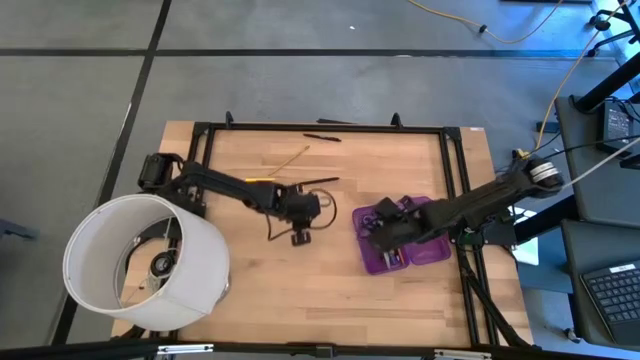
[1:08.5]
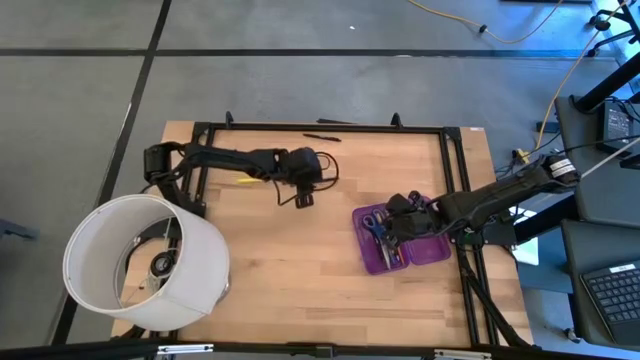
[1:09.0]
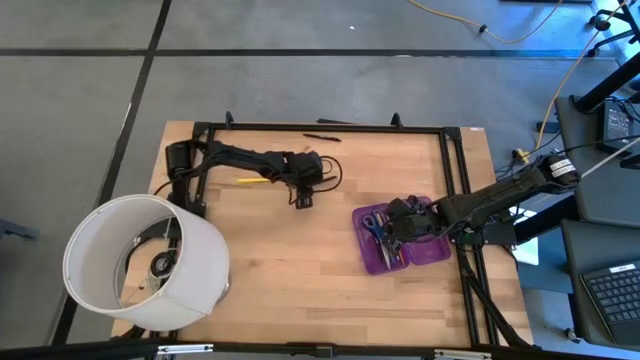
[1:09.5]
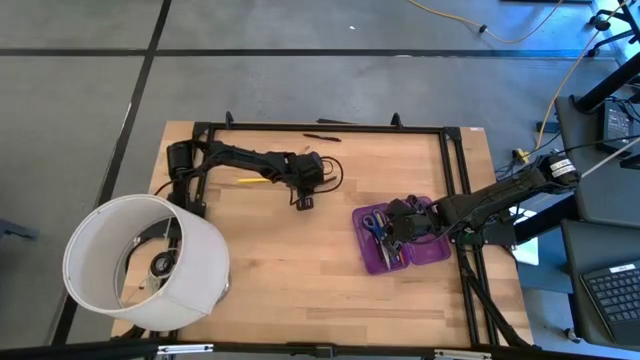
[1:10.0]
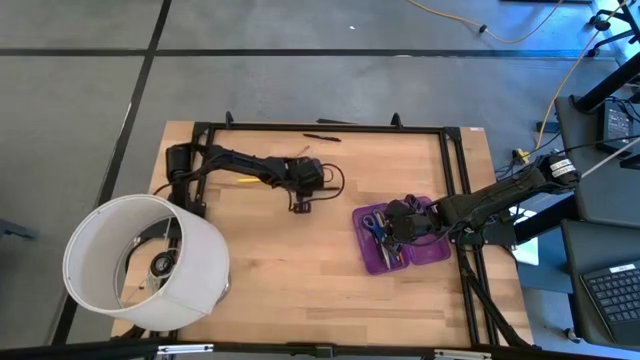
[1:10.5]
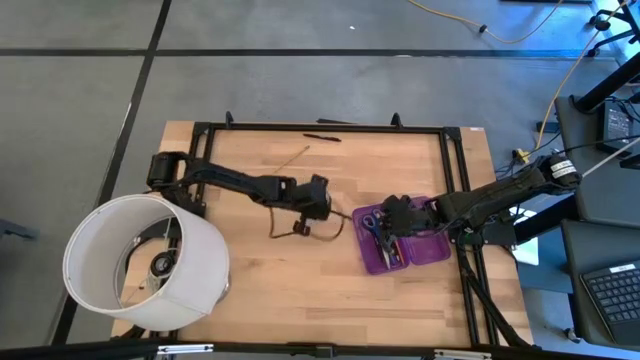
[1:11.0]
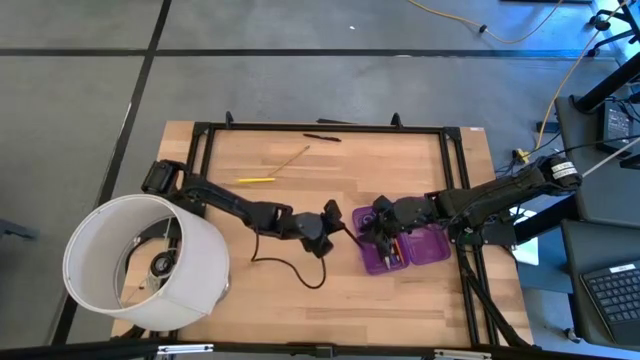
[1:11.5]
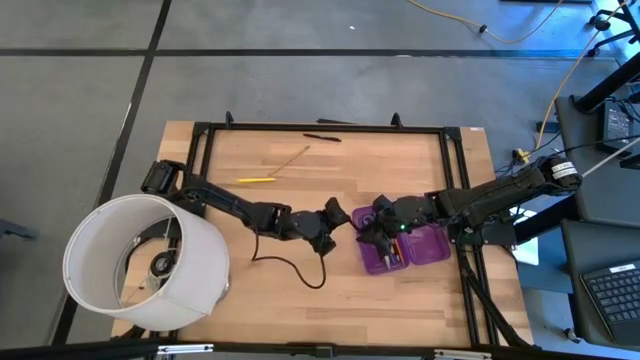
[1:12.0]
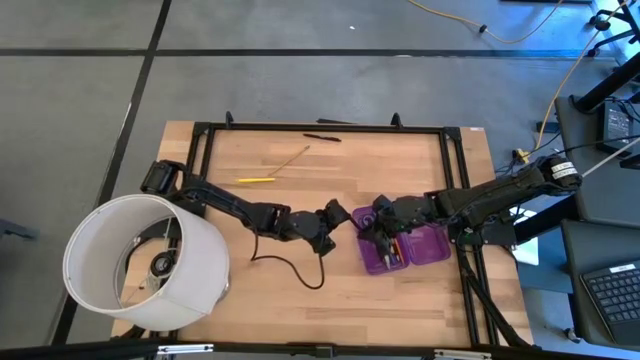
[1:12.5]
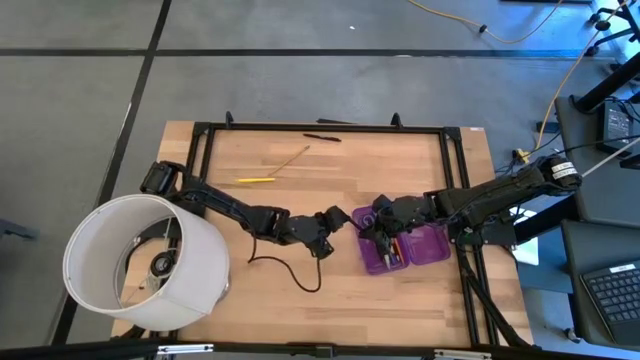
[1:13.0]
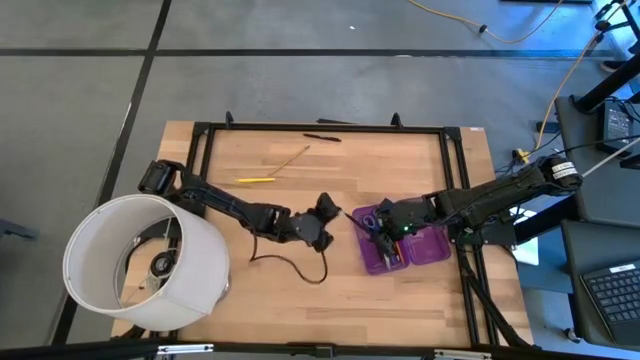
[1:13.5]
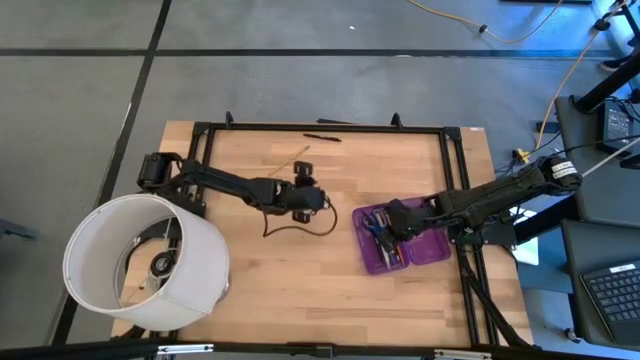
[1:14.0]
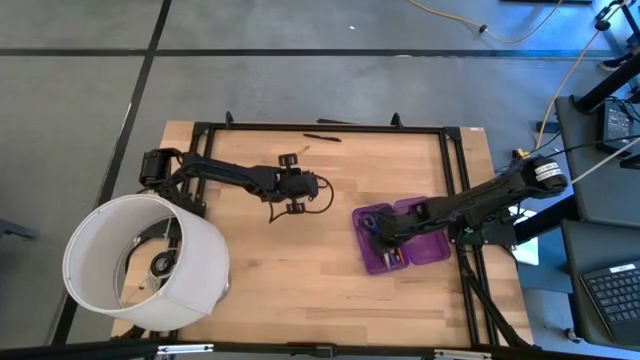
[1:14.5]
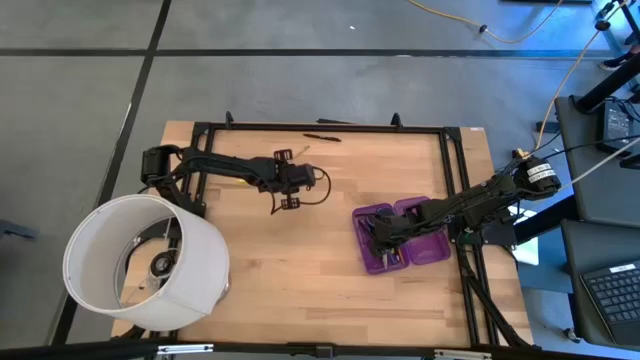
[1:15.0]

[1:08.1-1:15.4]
Task: Pick & place school supplies into a supply box
Put the bottom black pen into the supply box

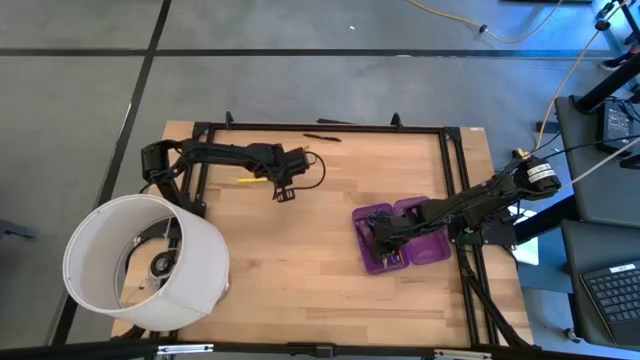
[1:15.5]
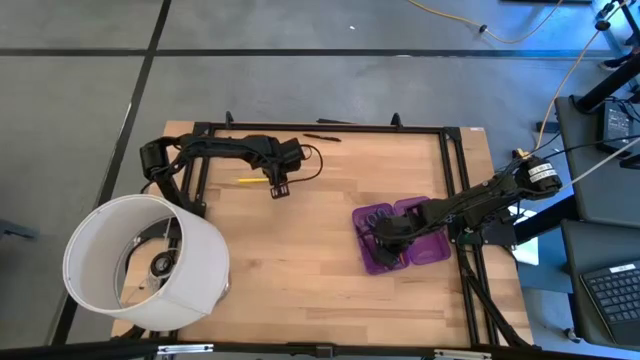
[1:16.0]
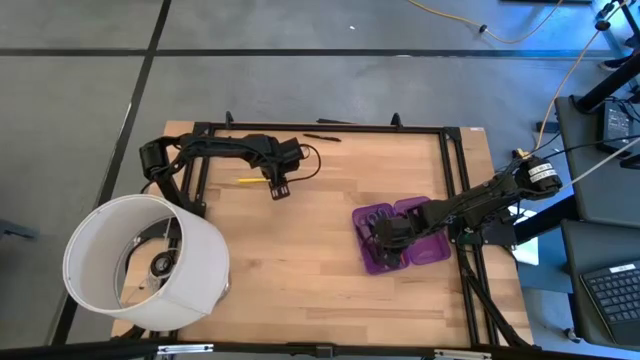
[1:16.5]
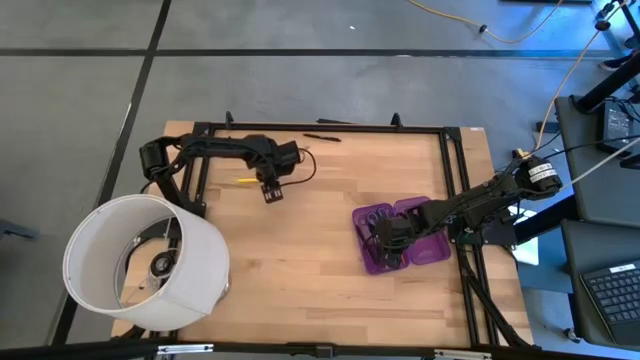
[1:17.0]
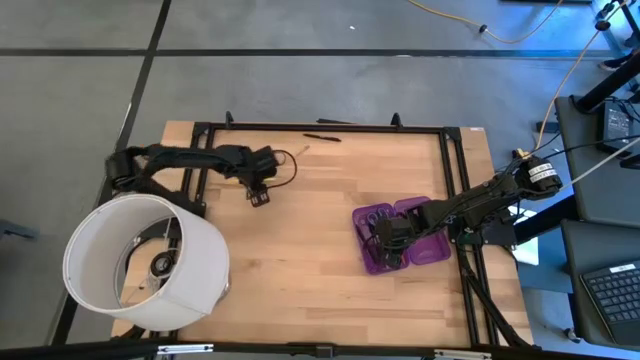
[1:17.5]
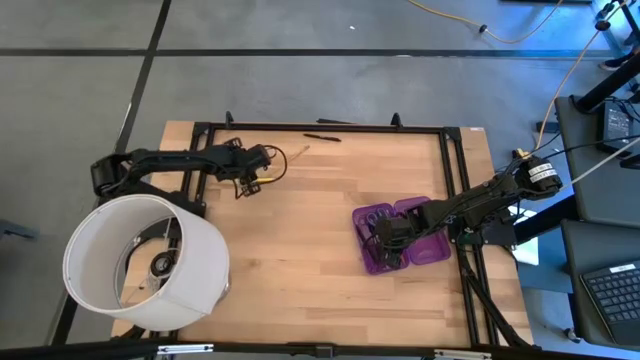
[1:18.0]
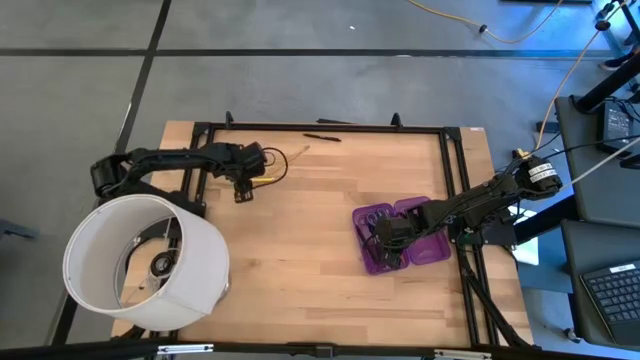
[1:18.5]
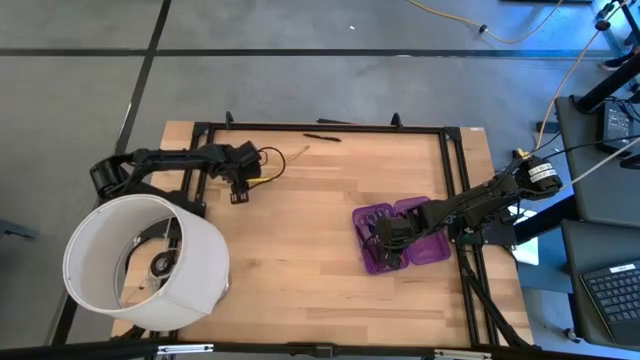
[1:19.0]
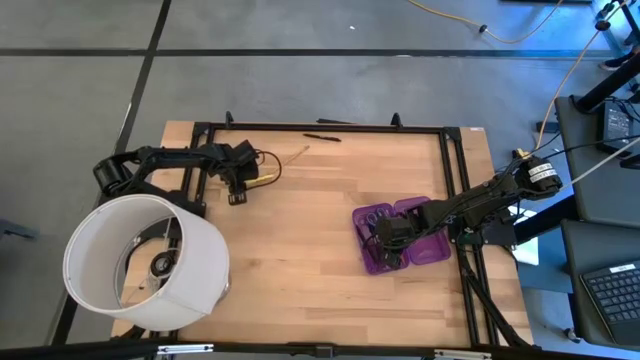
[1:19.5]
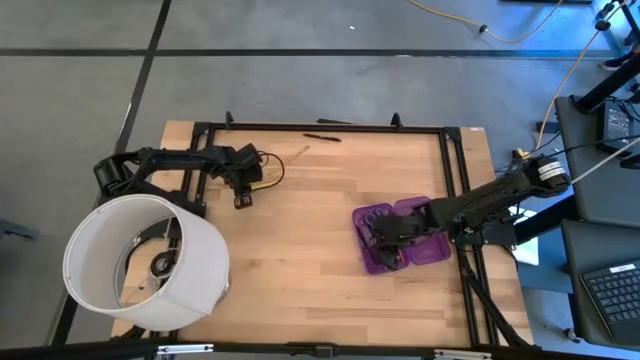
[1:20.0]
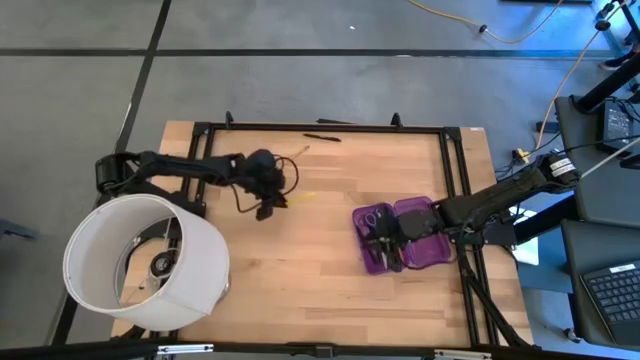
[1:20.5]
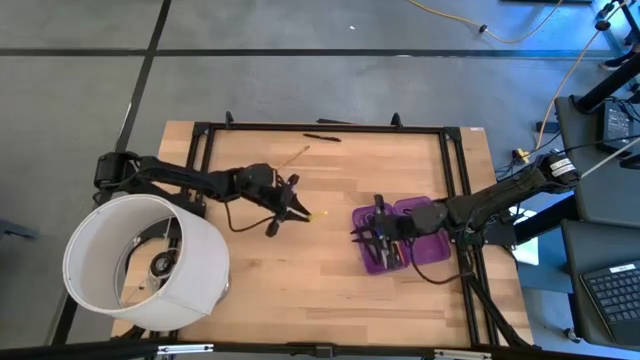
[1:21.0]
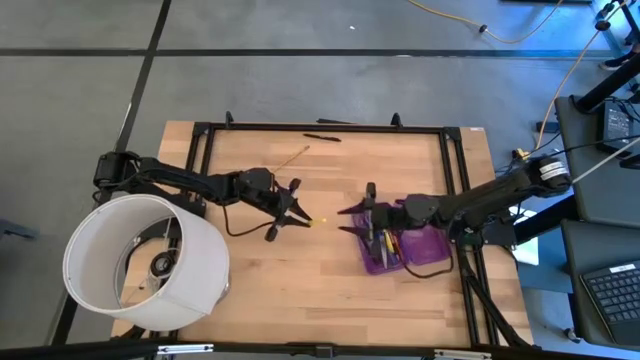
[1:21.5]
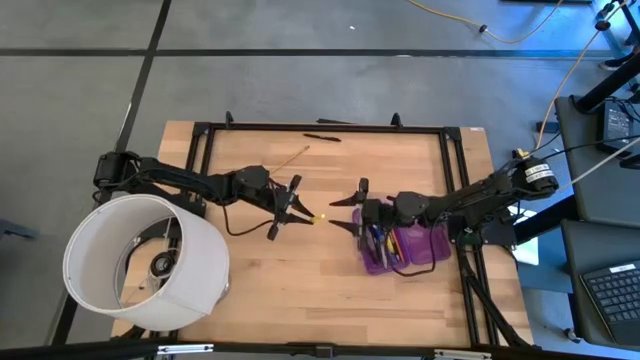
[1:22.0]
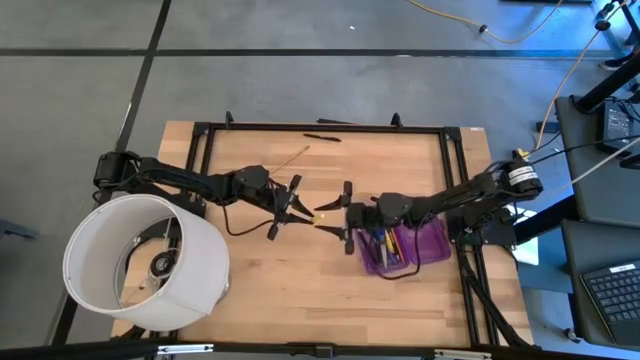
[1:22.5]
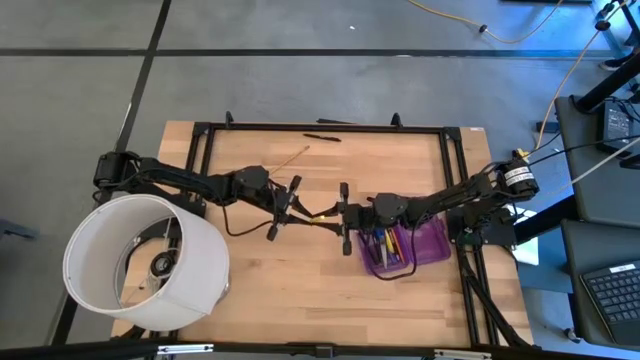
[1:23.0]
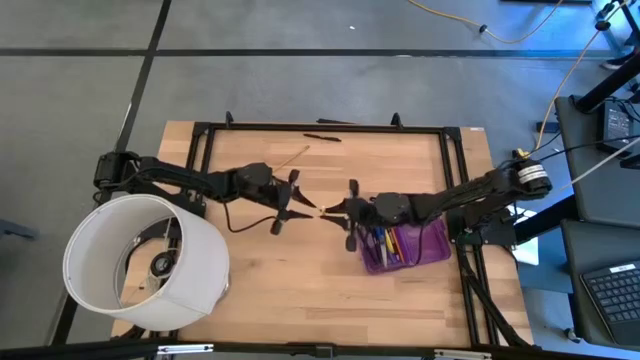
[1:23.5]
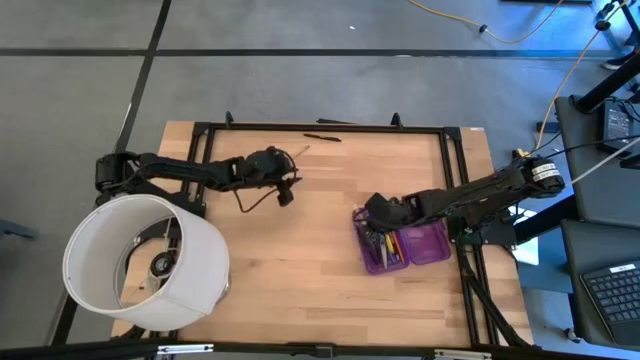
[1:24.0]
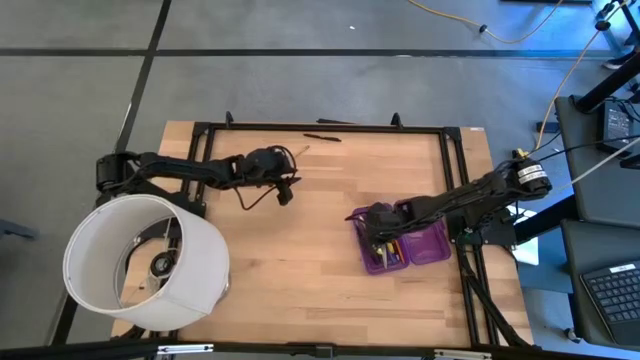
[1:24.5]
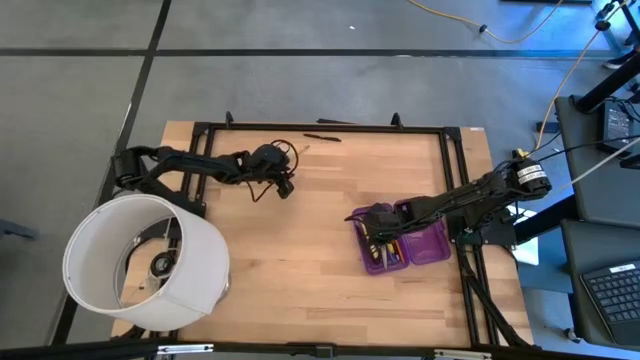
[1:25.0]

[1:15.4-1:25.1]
Put the yellow pen into the supply box

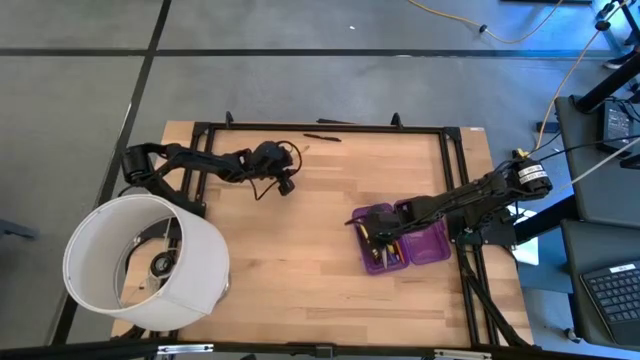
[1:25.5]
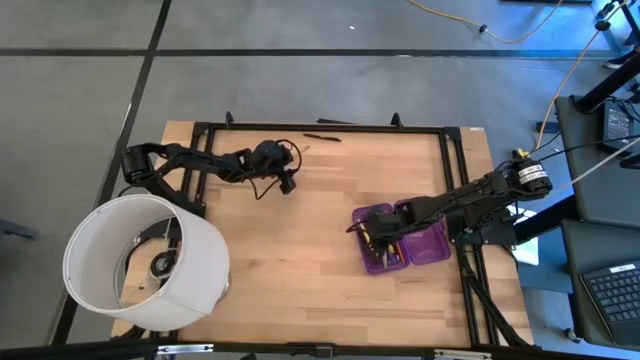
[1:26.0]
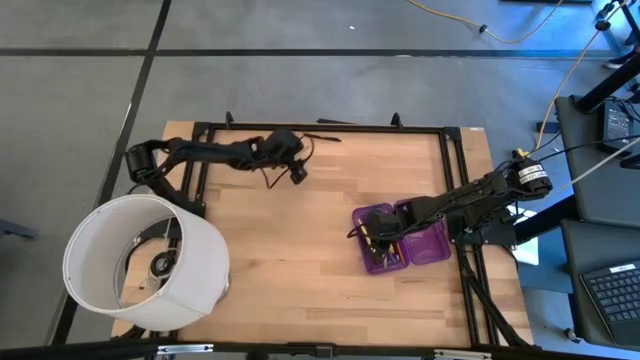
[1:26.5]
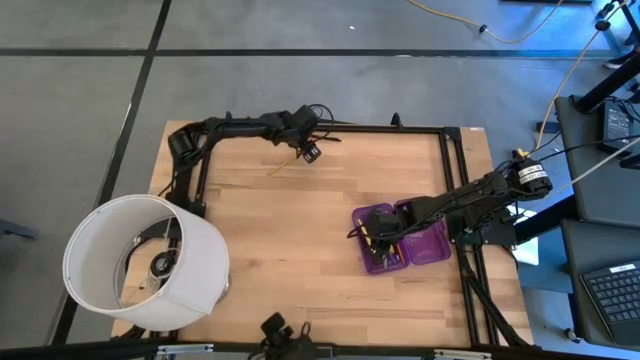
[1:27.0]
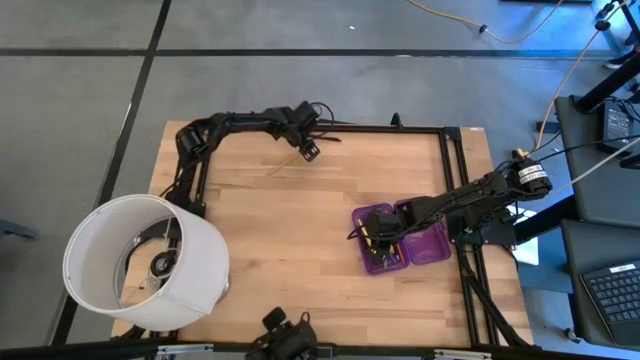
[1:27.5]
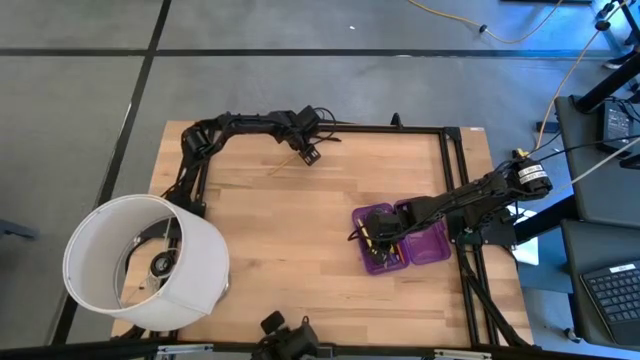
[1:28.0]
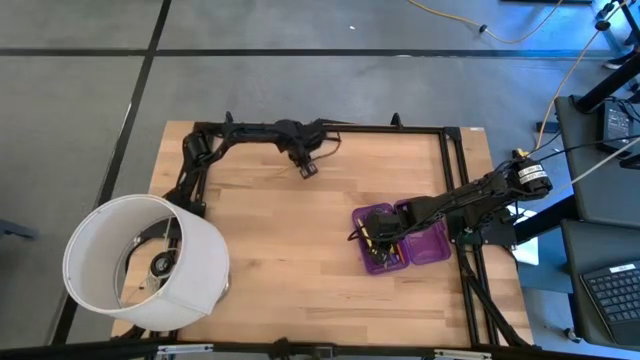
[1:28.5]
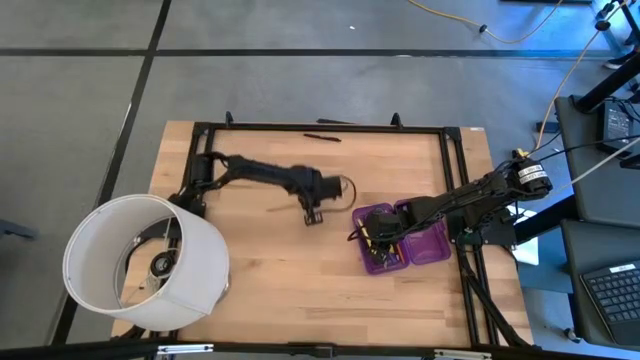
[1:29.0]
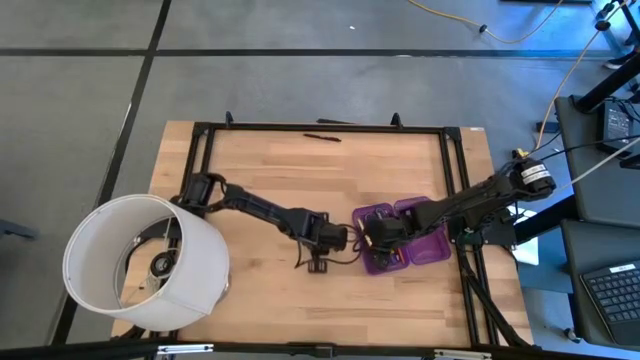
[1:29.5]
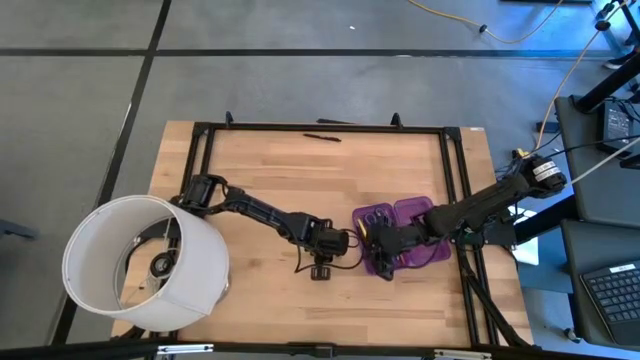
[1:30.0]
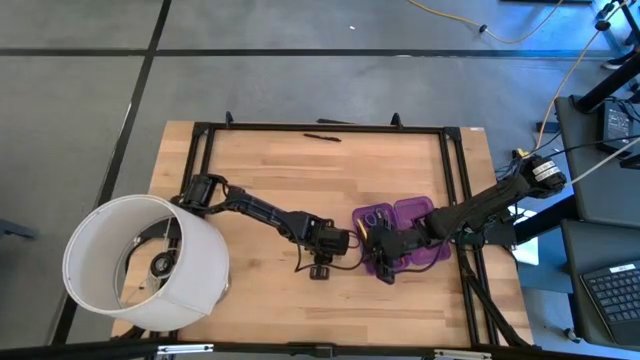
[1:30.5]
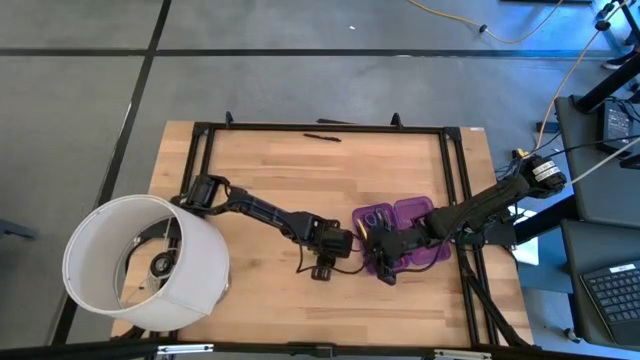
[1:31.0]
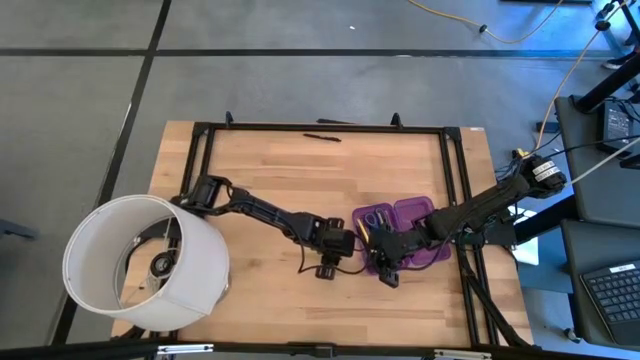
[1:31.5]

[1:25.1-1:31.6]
Put the pencil into the supply box
